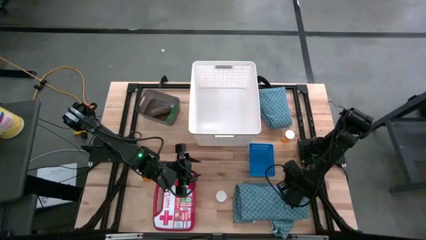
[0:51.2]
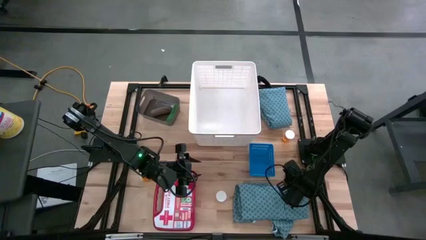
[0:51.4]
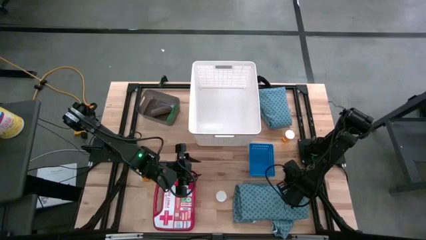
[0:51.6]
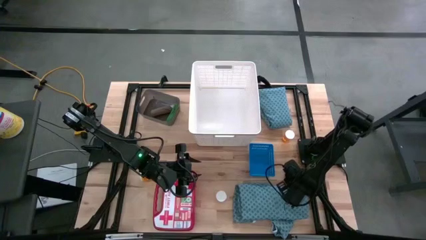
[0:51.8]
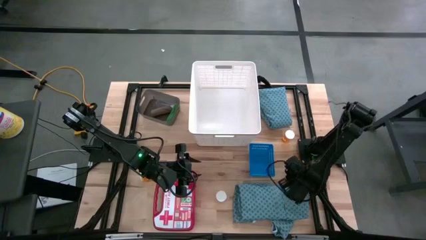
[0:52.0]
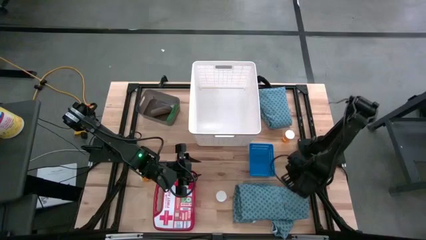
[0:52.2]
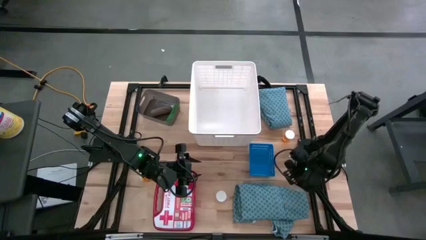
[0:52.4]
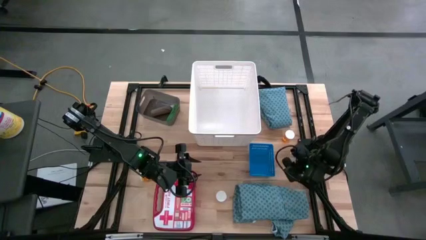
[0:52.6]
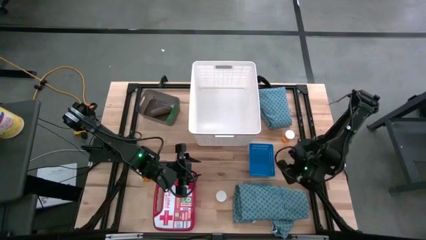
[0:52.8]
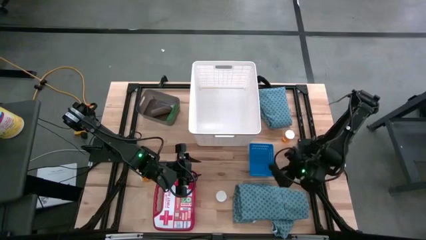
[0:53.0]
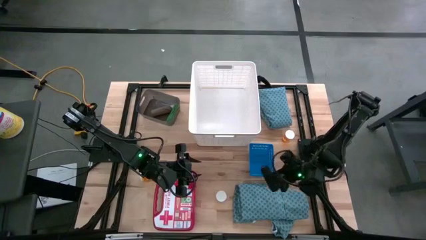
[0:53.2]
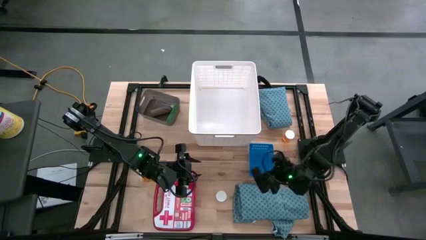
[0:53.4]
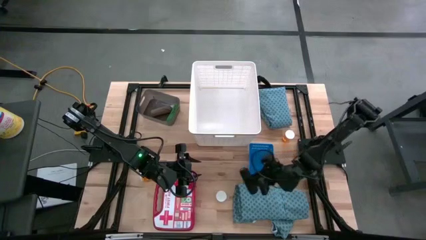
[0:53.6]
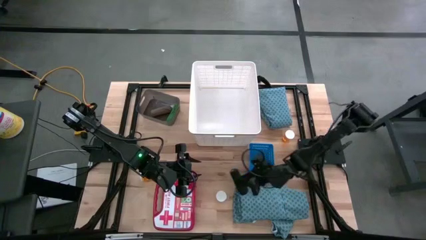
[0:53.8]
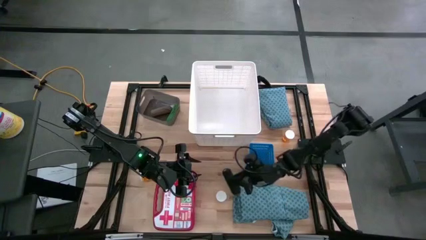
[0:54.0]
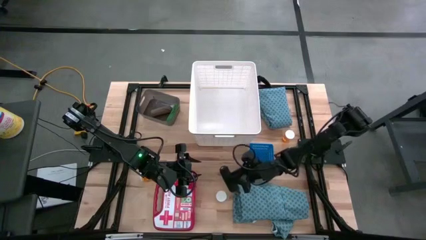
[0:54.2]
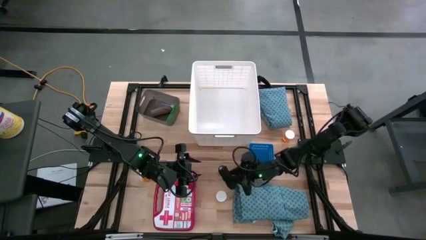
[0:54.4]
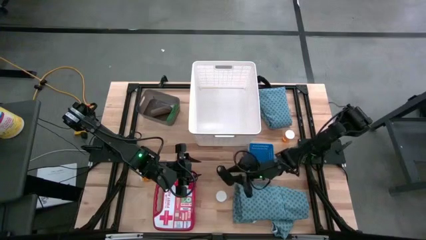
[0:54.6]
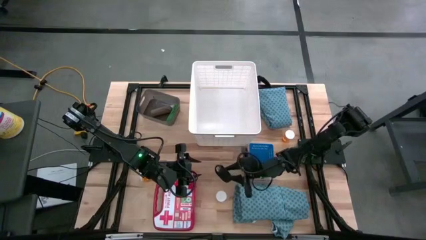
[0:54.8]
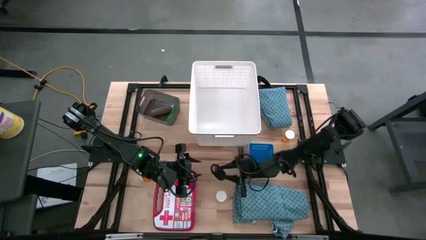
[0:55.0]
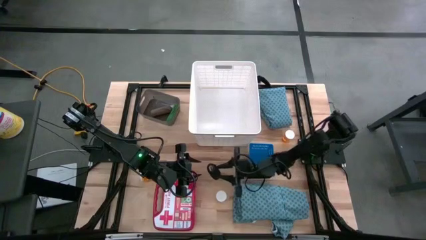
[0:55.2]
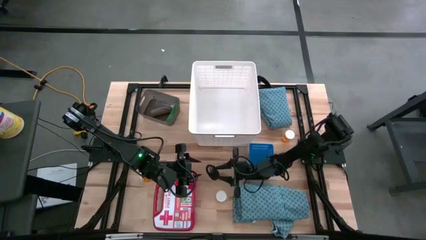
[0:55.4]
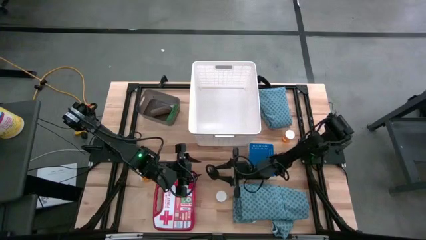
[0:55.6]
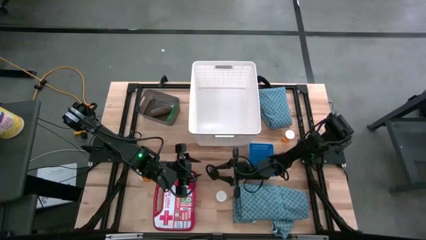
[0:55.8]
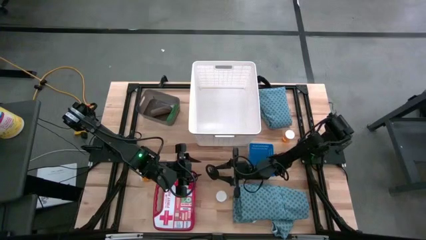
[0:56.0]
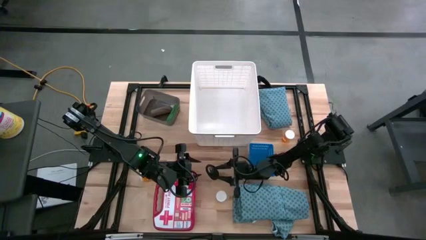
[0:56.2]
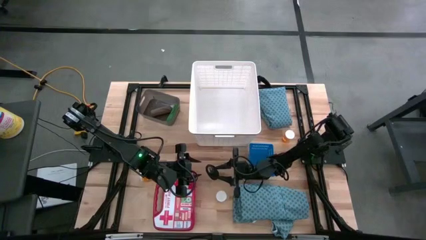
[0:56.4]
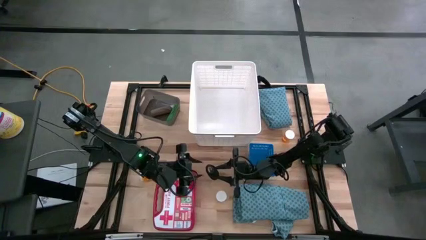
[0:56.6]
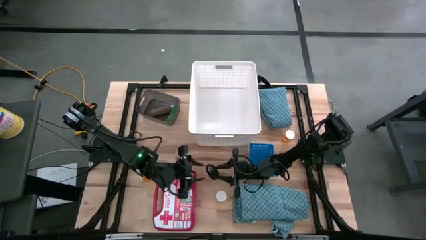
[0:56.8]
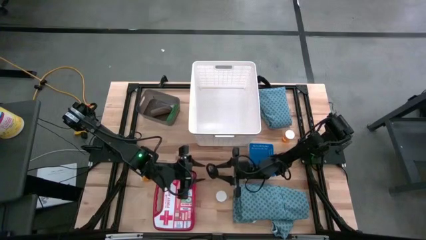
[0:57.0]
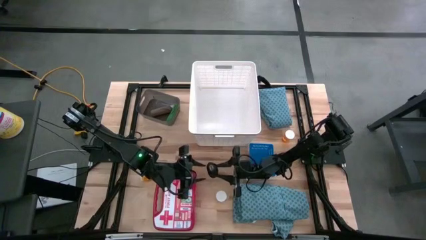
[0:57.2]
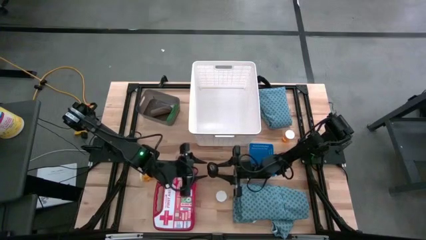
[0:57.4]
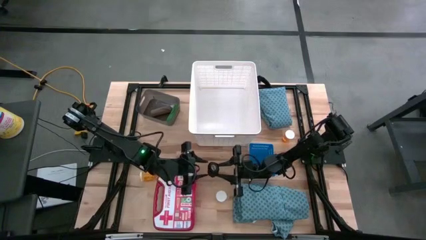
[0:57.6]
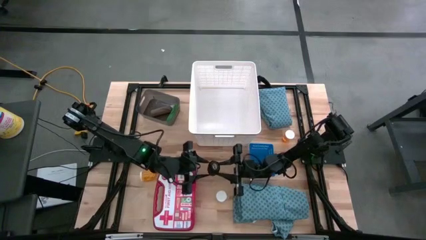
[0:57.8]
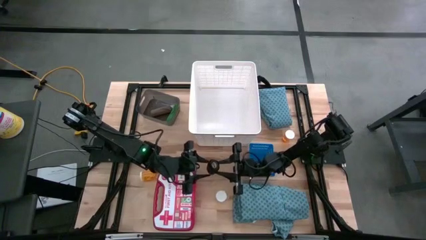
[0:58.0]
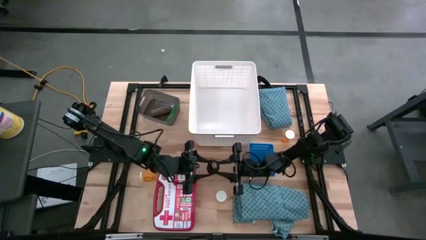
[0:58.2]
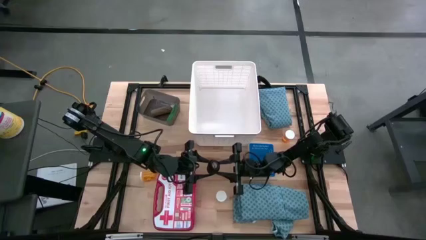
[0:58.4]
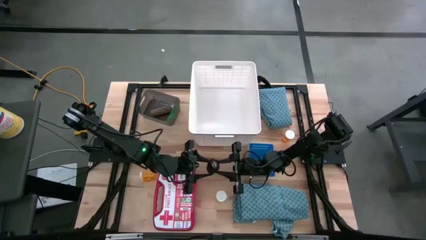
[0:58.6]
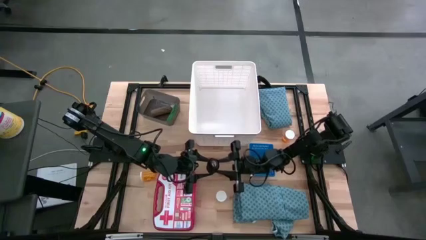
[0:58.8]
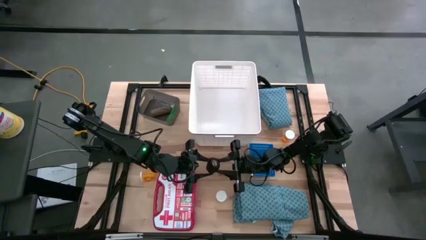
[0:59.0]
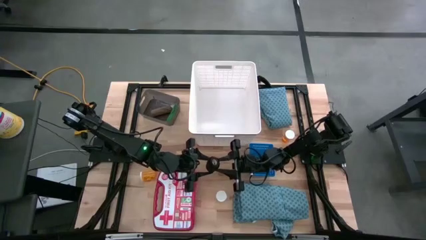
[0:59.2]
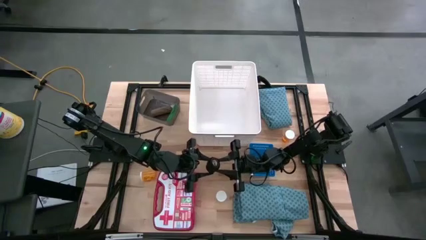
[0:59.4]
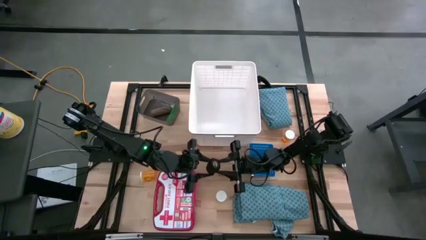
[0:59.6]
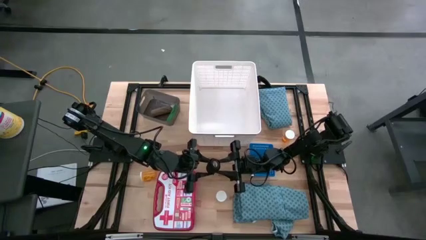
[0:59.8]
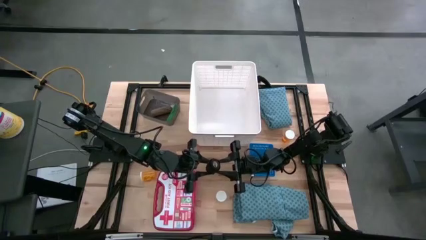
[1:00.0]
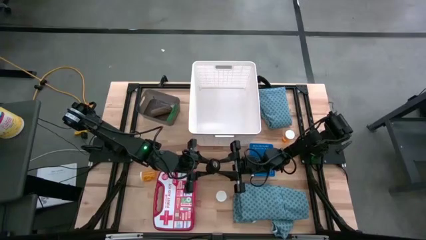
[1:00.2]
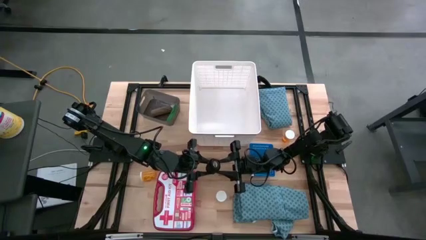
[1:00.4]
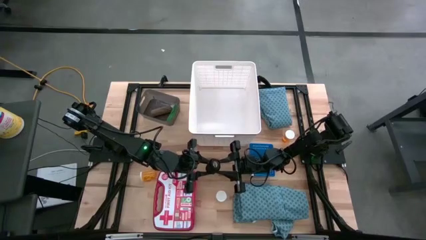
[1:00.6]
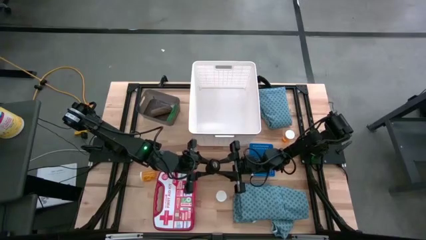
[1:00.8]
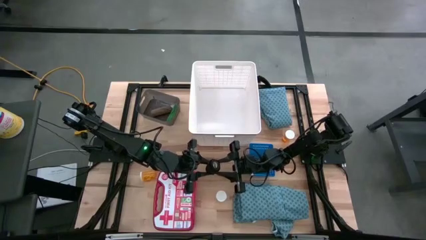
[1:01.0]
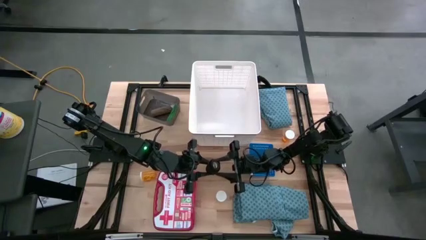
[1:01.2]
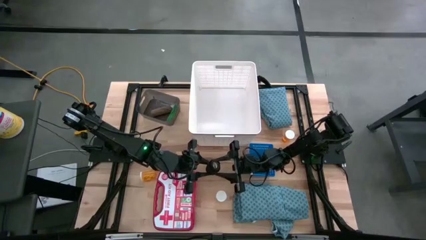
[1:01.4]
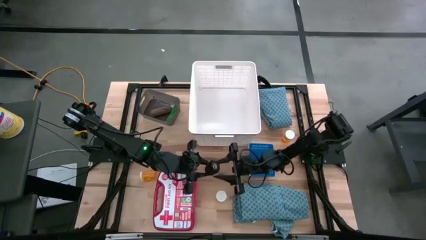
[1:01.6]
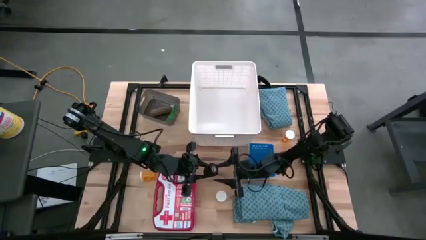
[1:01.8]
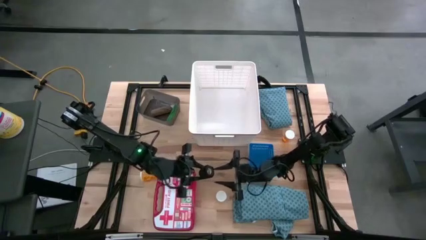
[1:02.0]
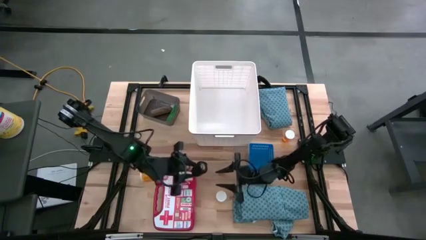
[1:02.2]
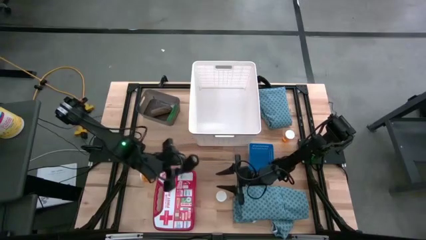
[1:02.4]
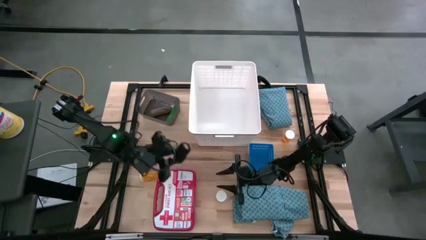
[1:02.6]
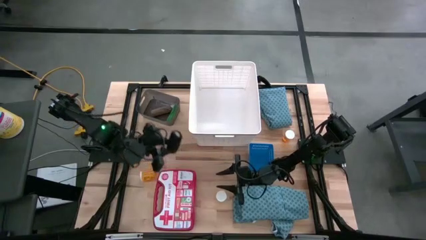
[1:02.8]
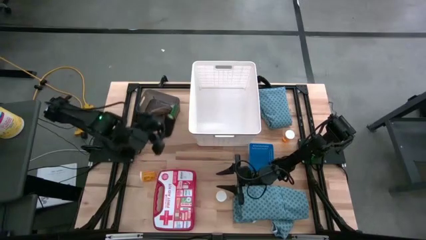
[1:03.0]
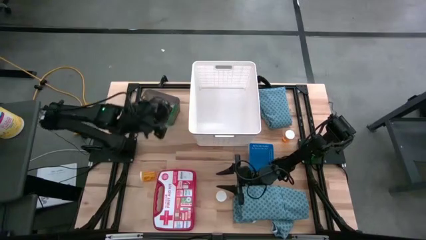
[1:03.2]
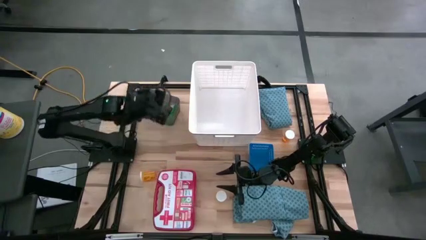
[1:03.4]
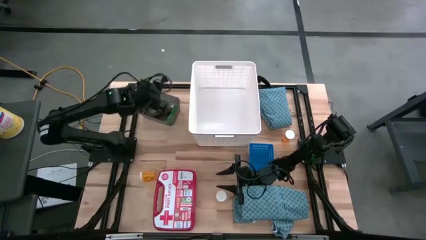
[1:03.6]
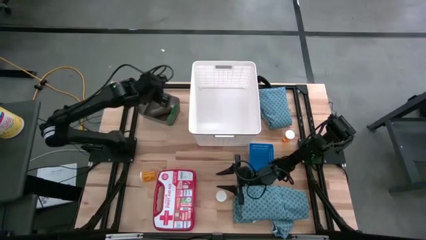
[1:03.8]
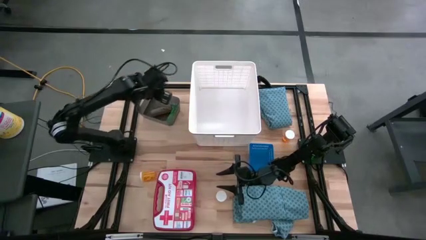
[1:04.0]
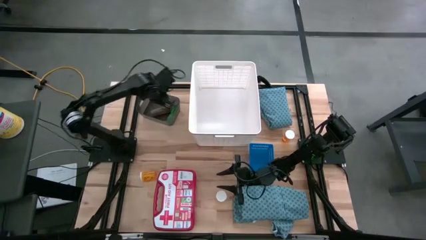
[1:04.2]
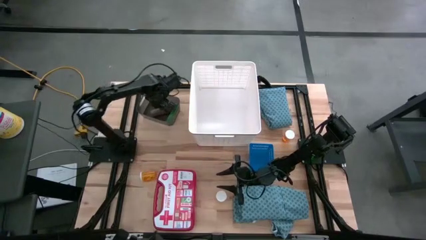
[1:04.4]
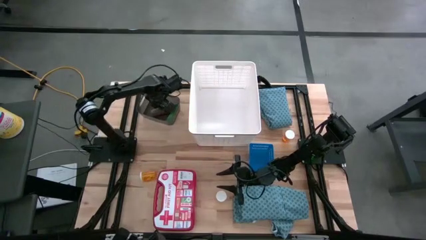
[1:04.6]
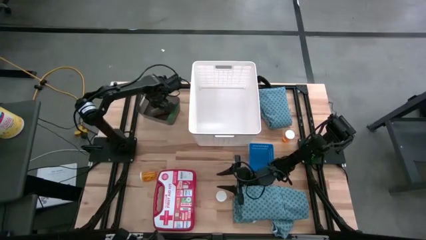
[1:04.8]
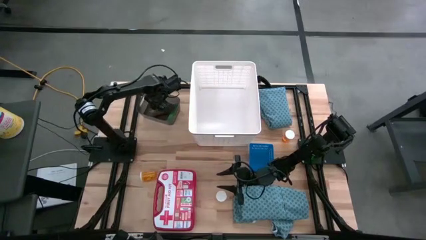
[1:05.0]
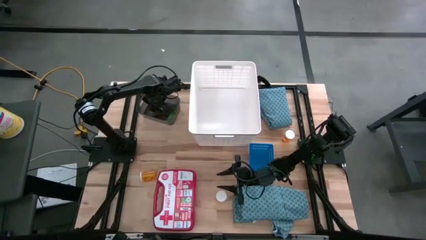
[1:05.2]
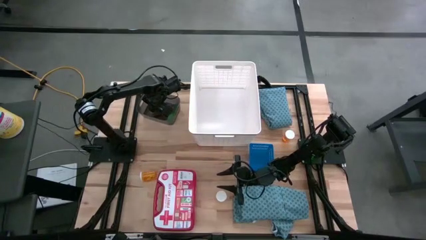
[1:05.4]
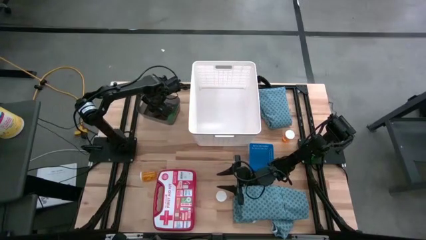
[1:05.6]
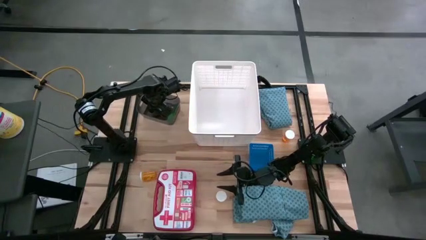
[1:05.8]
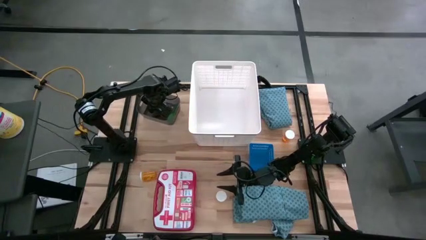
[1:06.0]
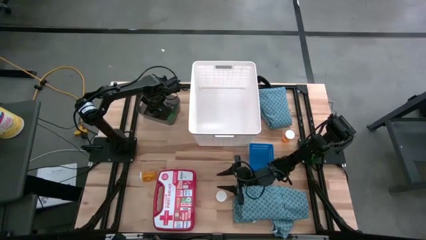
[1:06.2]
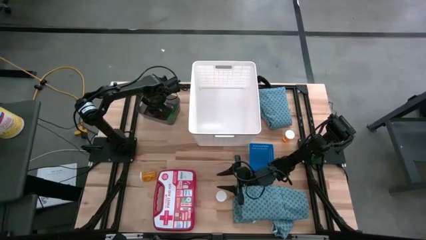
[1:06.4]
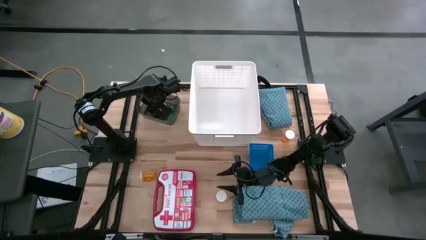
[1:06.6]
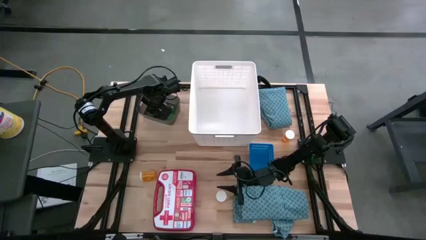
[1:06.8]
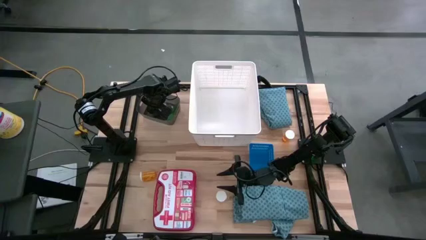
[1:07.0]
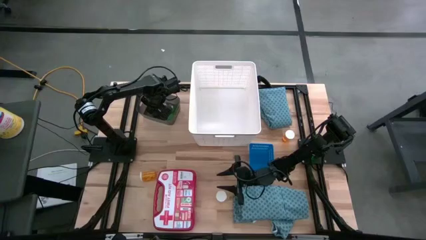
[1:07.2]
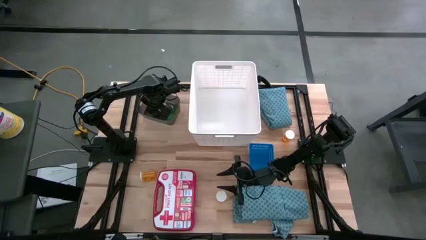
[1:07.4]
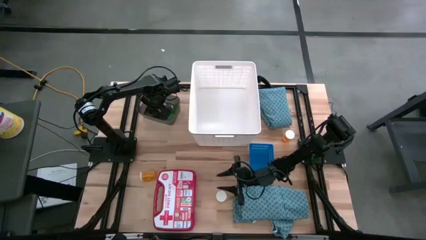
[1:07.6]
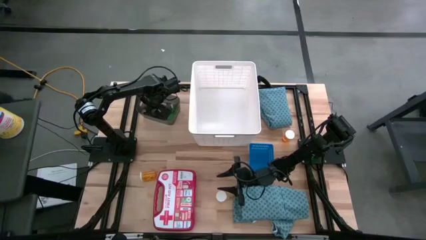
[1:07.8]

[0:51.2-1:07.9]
Task: Pick & place medical supplies in basket/bin
Put the black bandage into the black bin
